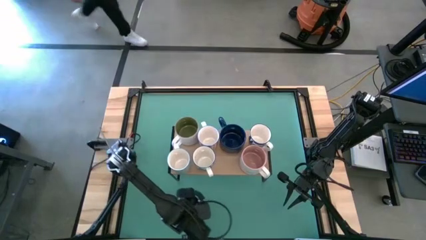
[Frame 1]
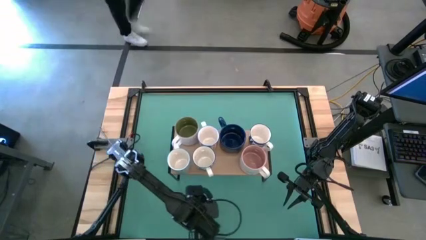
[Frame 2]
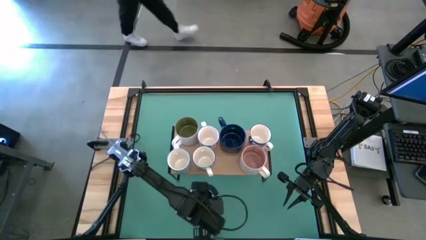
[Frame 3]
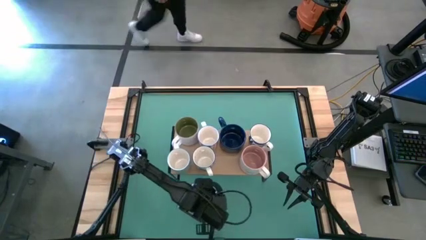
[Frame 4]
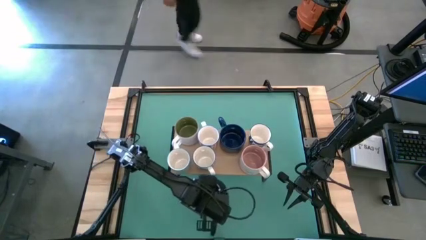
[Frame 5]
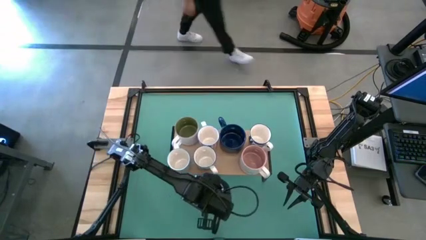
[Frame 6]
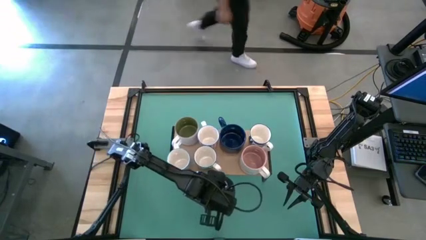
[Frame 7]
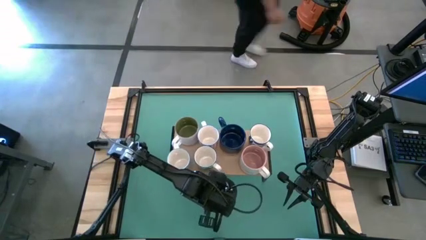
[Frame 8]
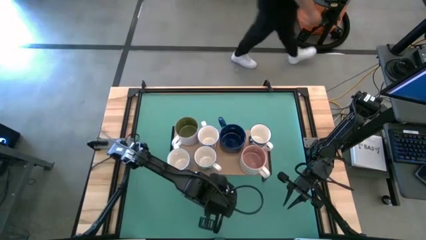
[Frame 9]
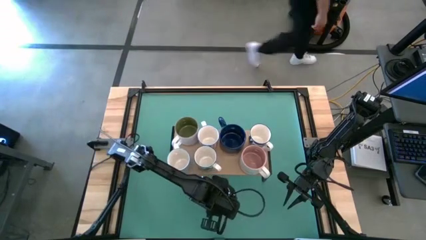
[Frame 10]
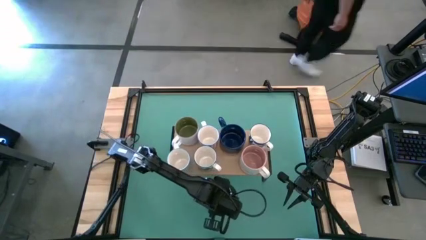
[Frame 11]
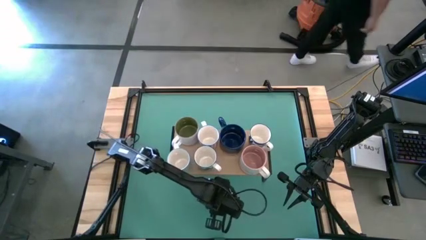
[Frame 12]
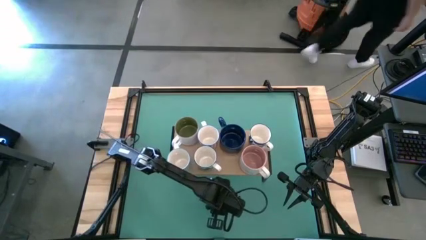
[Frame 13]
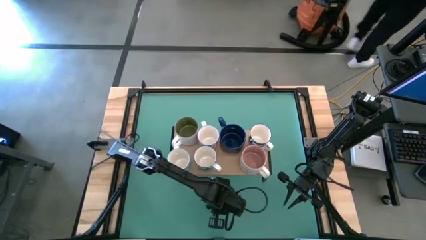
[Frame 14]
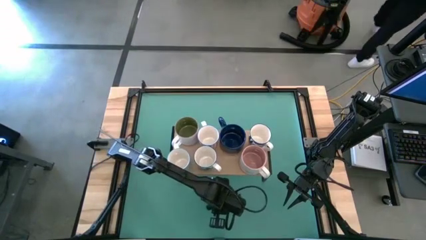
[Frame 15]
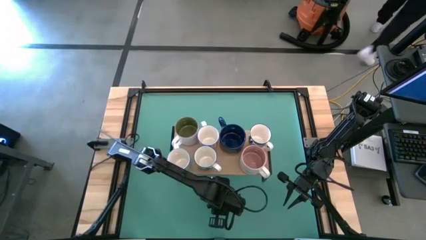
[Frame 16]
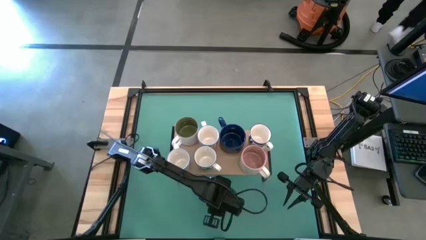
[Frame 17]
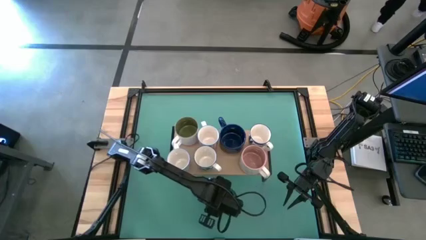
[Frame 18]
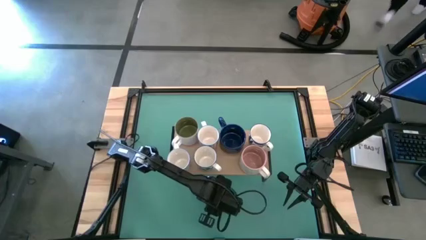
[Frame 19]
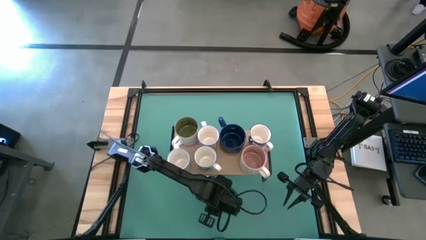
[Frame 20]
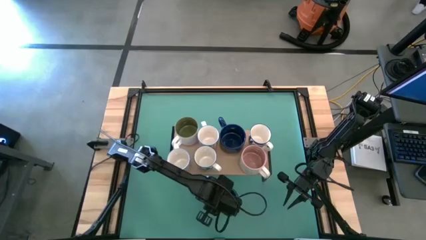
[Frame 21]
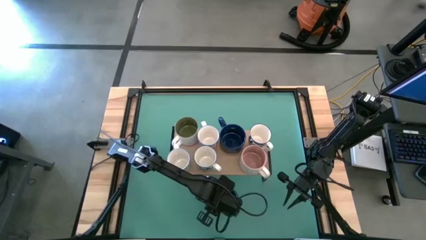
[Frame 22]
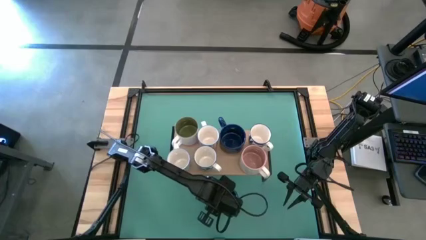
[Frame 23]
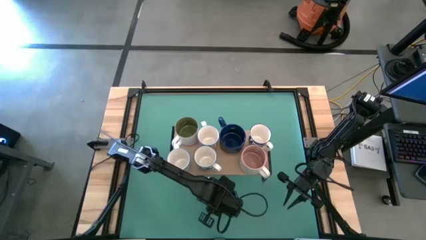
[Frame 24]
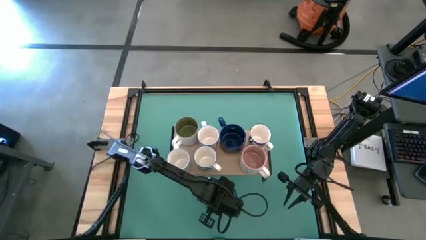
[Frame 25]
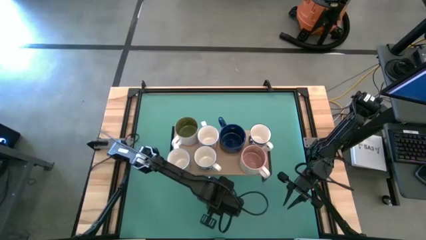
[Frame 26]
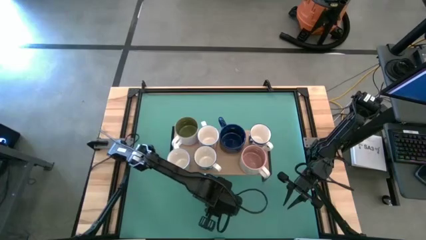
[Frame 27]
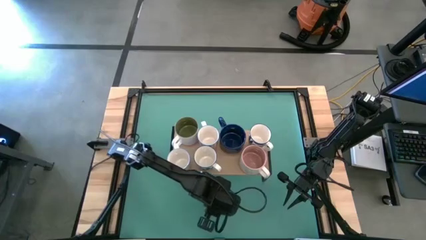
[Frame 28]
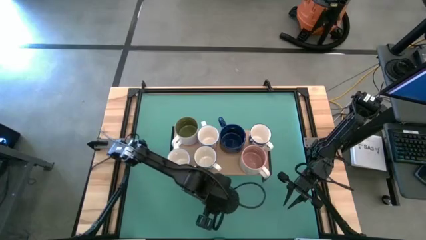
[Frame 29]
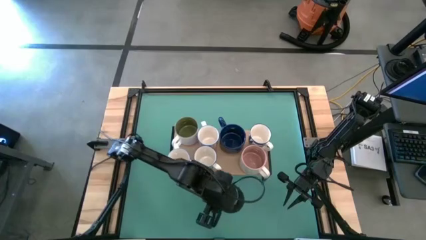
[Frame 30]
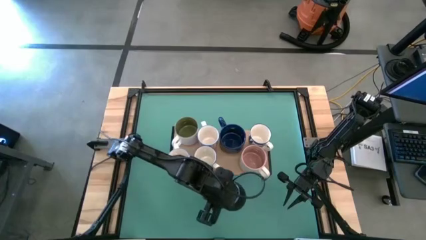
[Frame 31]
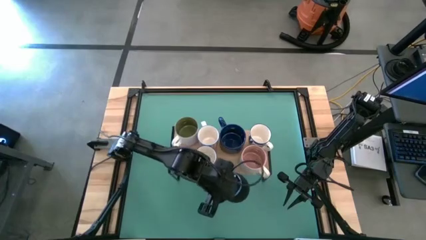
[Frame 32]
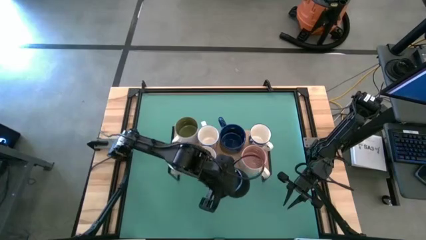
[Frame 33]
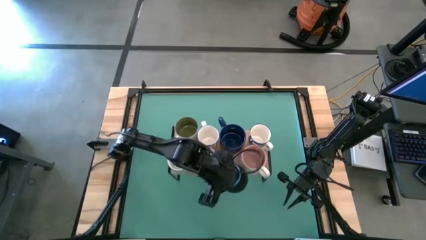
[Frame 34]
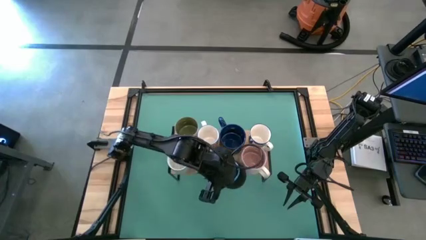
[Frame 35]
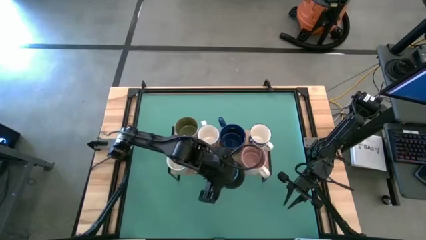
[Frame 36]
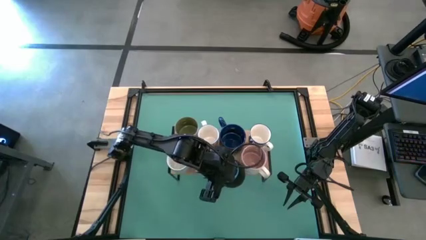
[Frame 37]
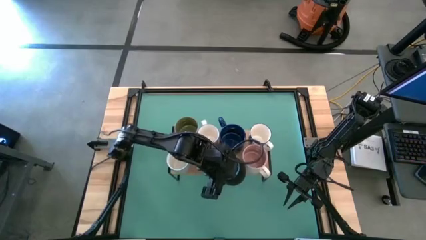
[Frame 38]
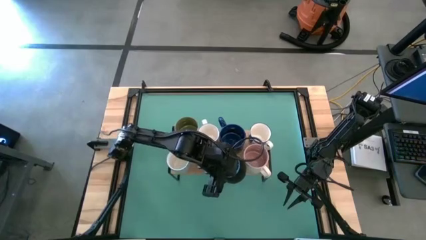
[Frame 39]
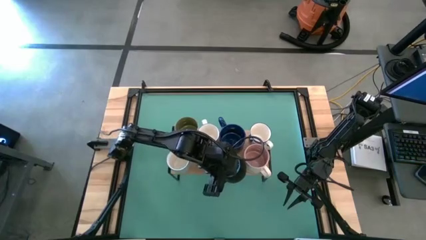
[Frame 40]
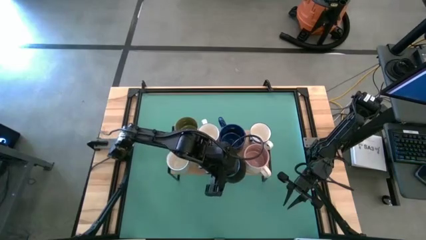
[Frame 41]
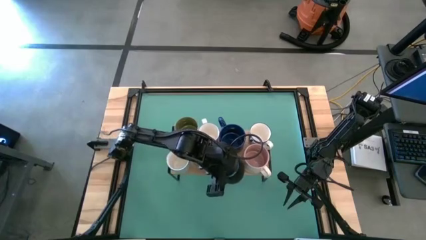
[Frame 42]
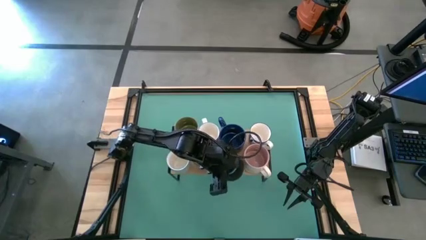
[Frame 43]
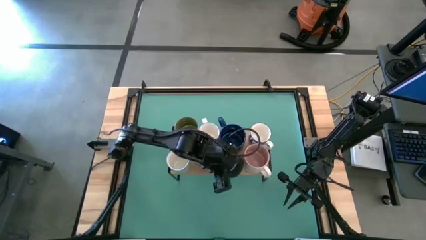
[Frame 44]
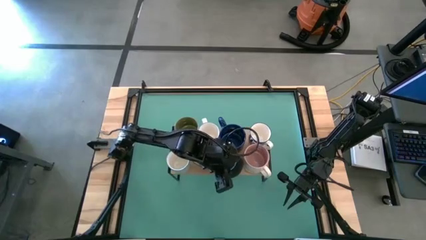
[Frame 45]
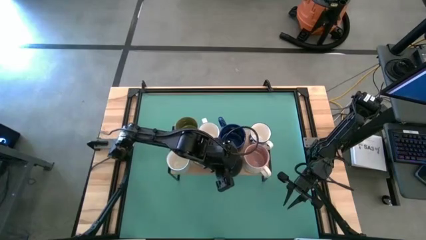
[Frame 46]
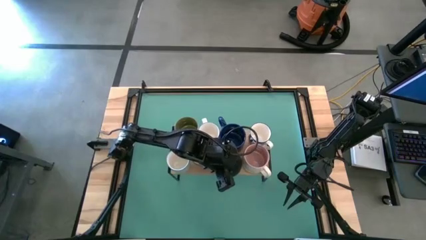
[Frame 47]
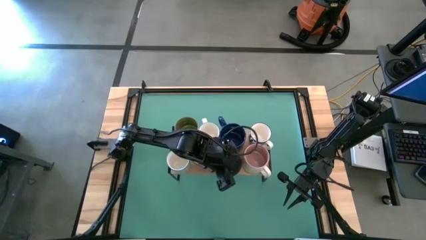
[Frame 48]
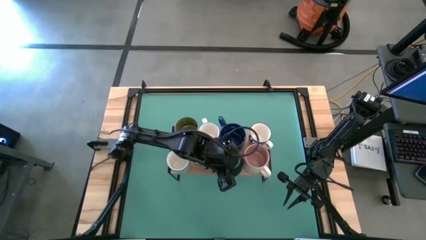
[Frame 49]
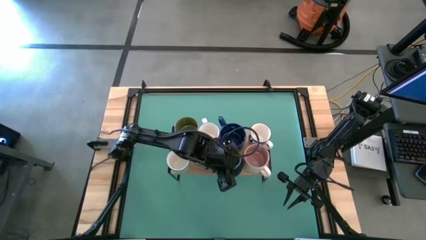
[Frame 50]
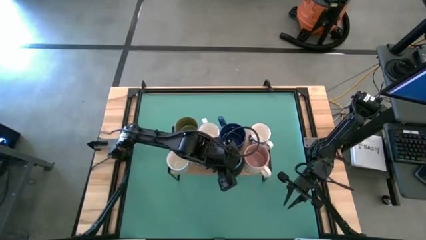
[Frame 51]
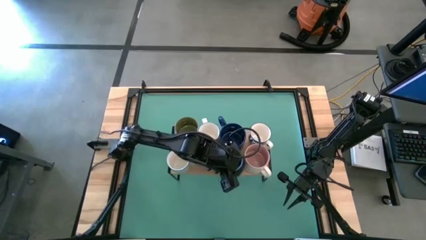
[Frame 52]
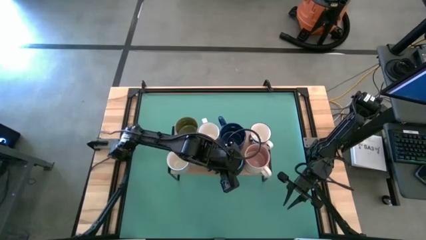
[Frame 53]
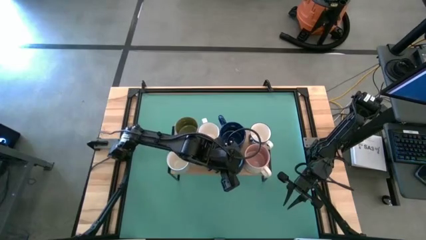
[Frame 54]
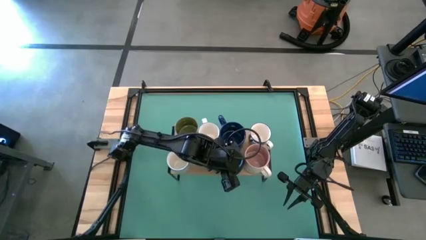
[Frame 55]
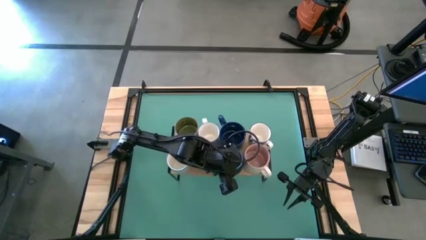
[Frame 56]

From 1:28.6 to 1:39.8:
Task: Place coffee mugs
Put the blue mug on the shelf
